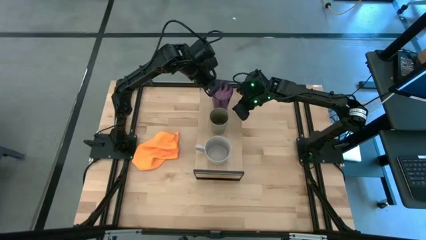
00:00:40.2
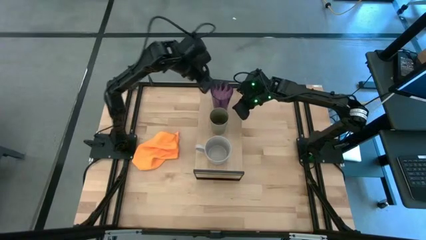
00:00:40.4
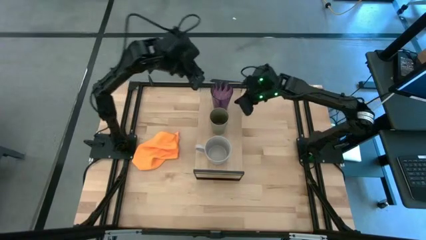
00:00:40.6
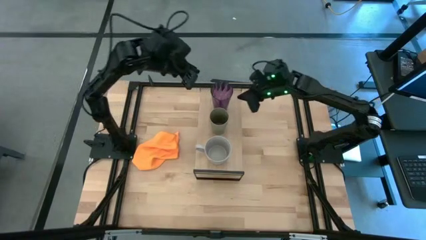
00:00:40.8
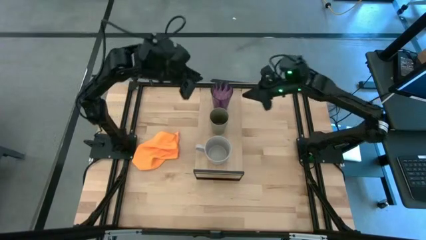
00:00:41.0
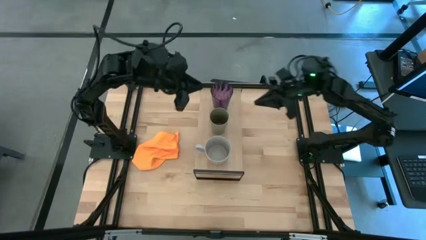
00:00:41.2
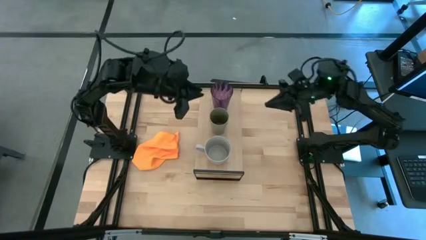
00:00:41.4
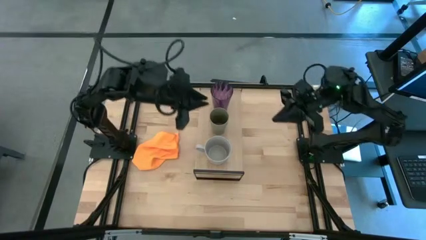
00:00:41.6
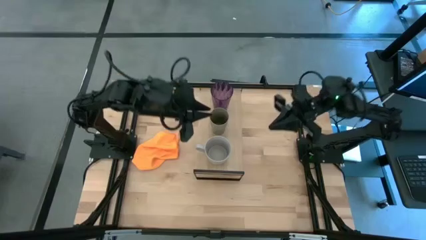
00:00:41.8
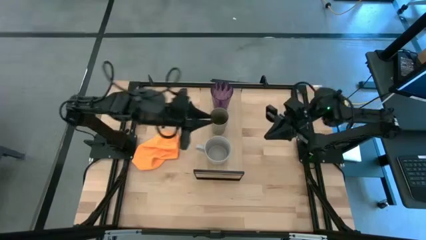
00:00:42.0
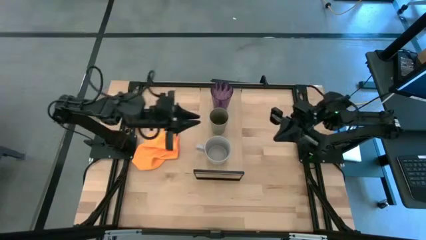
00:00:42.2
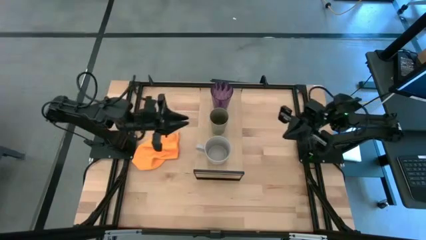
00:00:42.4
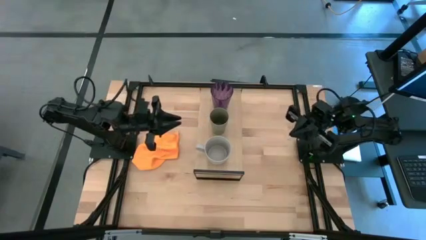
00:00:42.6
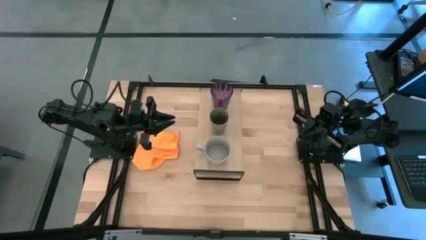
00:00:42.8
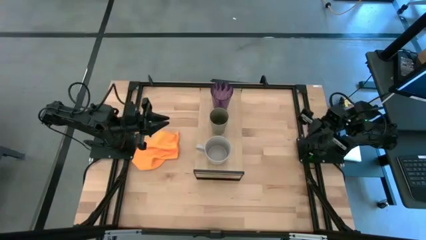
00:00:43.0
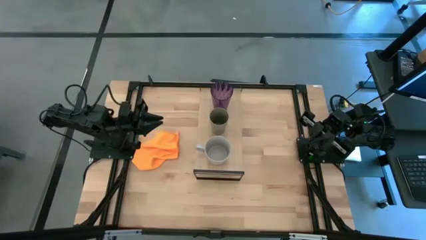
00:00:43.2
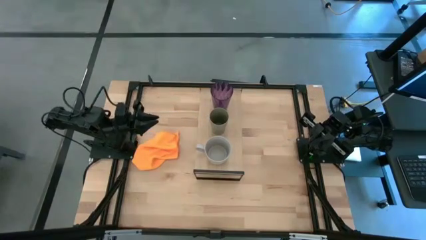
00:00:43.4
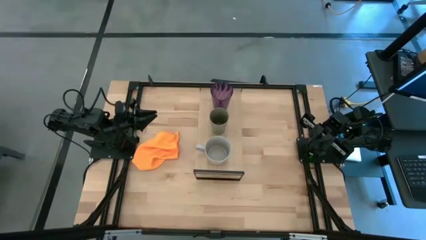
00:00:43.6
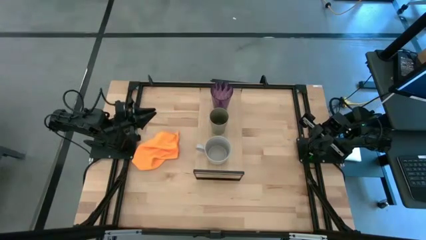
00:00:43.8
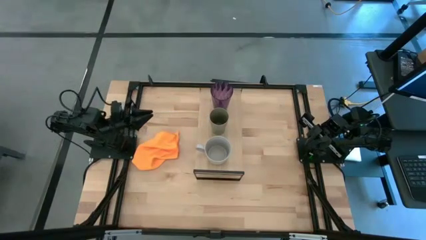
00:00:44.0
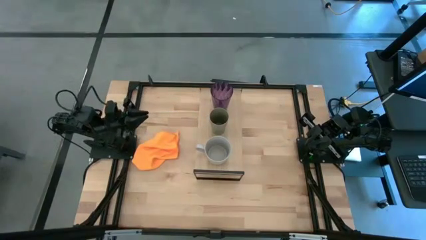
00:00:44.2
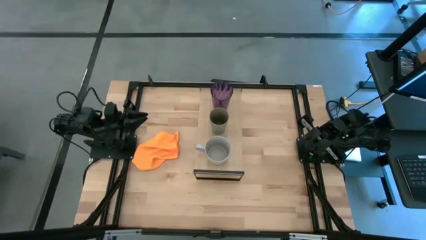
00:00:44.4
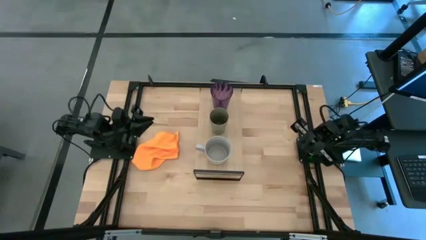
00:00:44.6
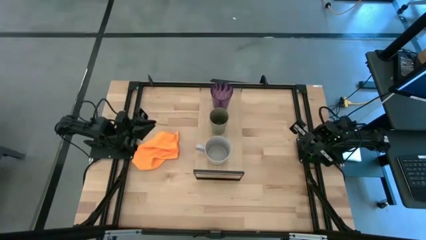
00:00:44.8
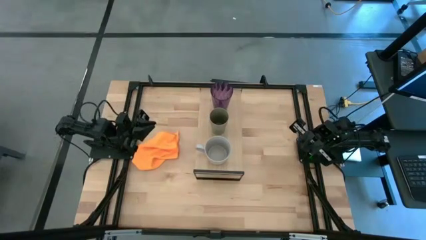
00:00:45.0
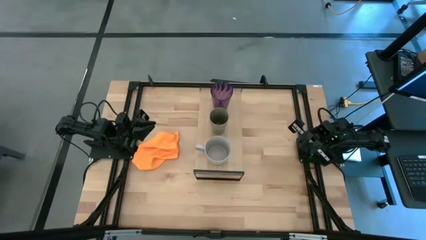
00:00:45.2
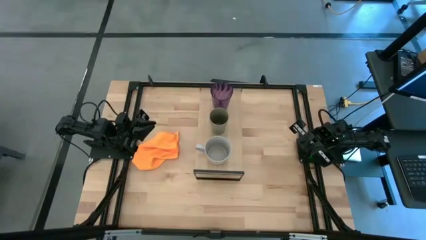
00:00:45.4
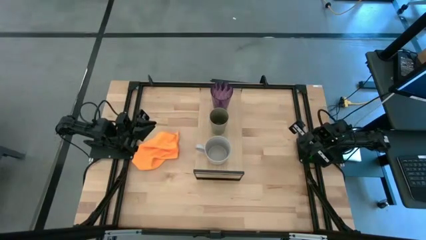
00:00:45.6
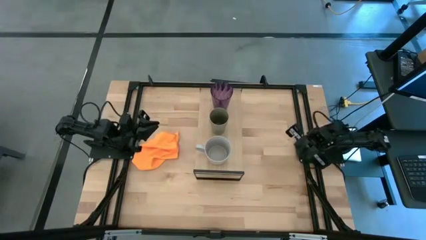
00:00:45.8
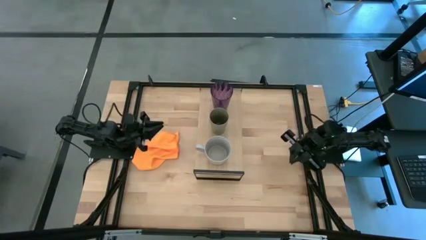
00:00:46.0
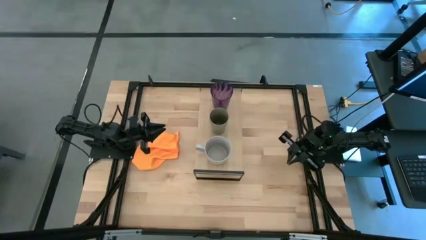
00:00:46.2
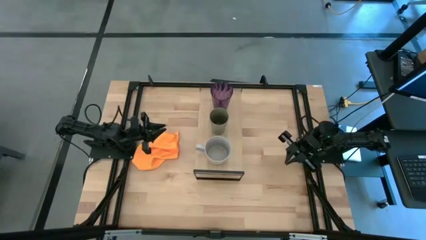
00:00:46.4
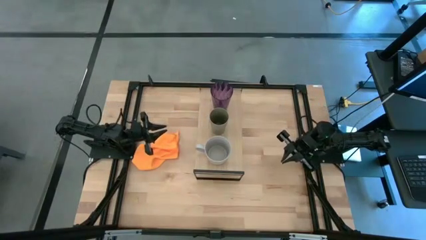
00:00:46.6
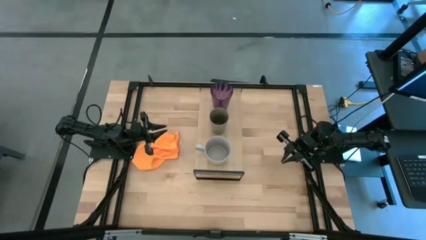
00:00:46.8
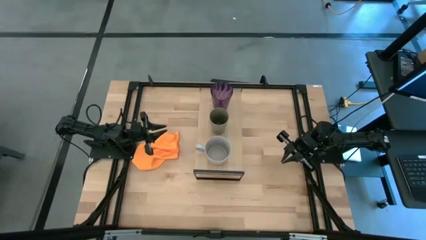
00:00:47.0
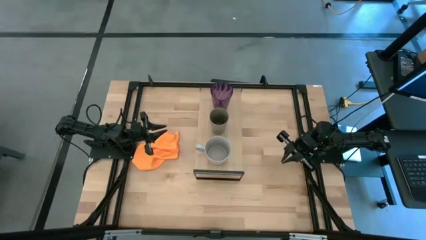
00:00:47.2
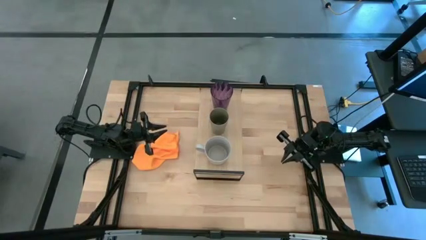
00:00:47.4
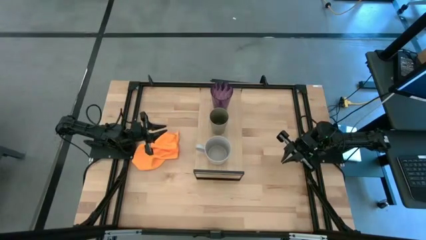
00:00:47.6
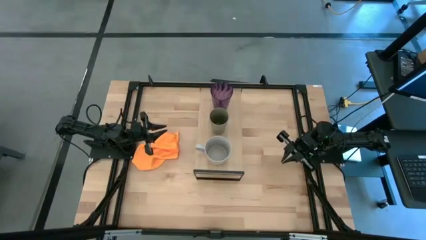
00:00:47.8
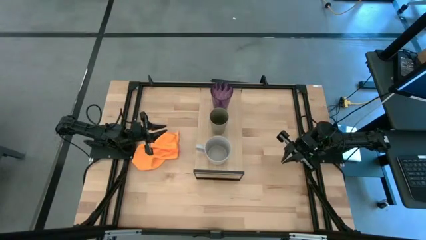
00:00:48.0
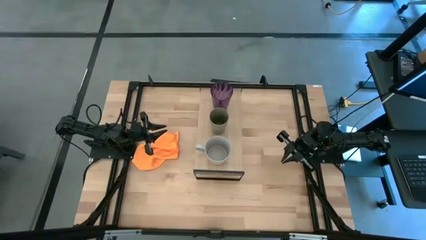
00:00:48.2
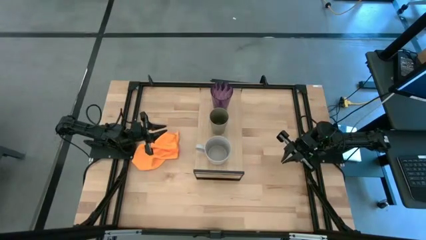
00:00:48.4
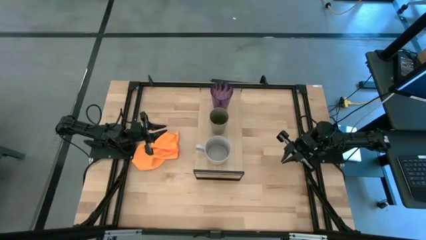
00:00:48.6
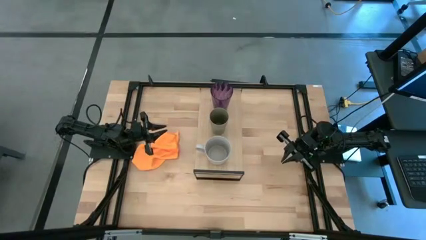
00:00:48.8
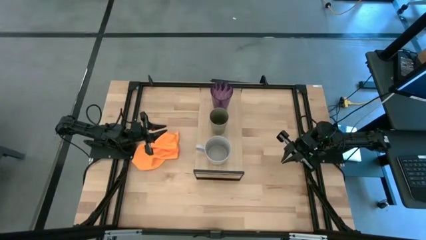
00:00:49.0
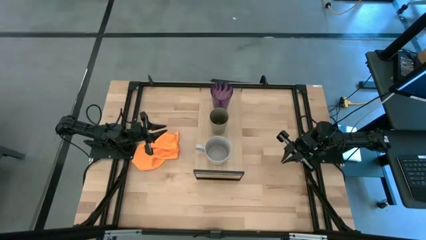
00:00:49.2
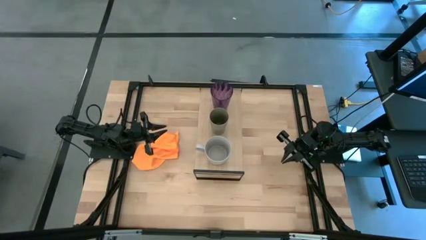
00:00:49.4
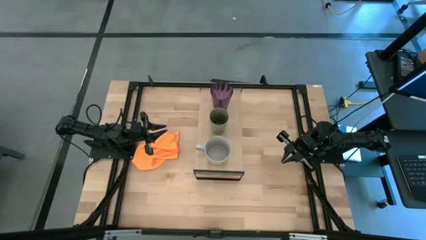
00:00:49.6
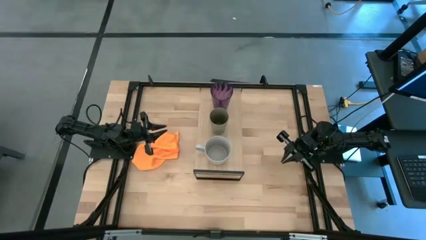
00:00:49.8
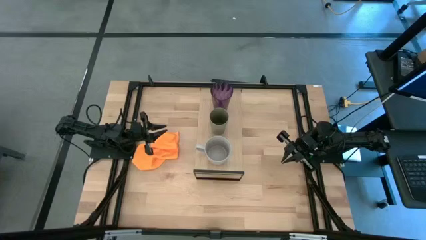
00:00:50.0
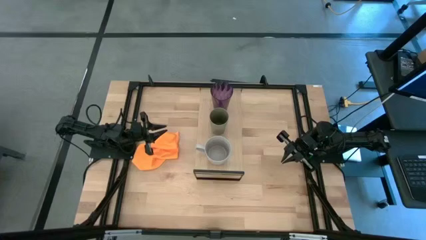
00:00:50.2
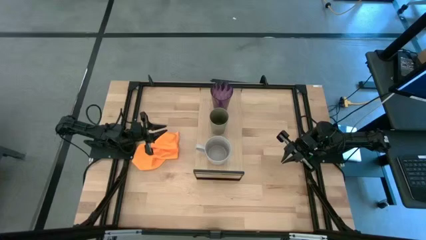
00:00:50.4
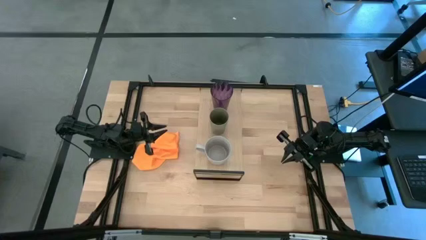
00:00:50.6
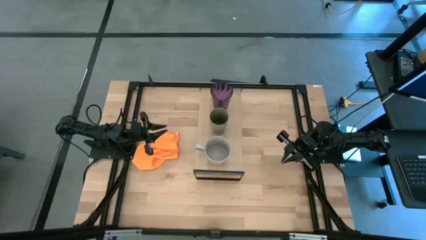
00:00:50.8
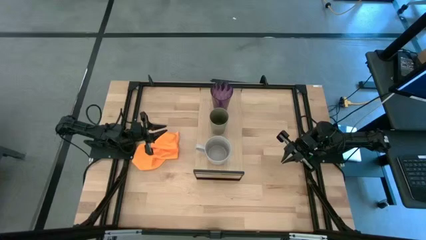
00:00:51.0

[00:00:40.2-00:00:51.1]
Task: Stack small to large cups/mugs on shelf
Return to Home Position
